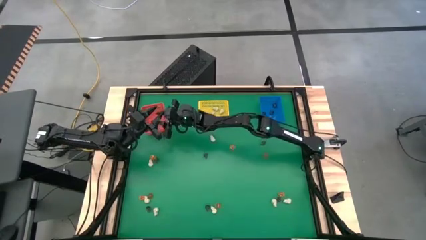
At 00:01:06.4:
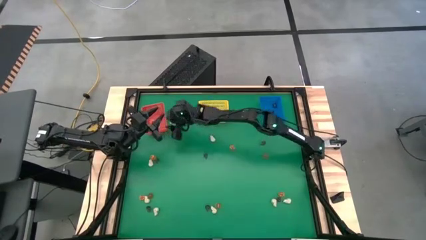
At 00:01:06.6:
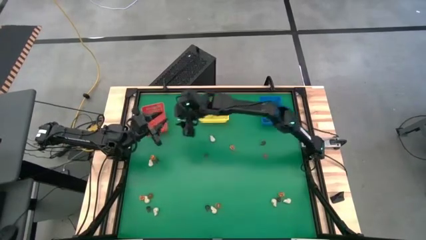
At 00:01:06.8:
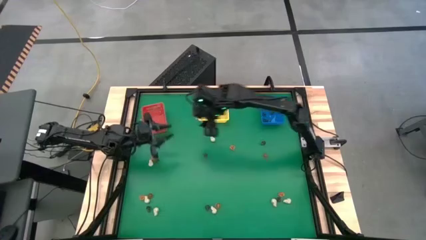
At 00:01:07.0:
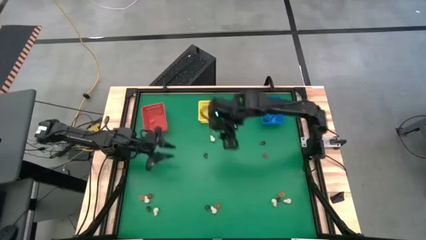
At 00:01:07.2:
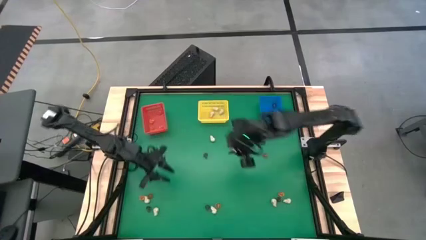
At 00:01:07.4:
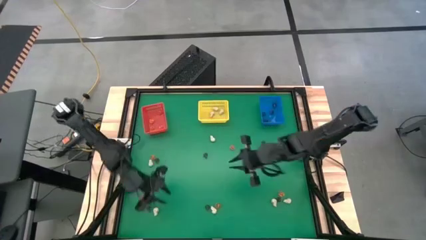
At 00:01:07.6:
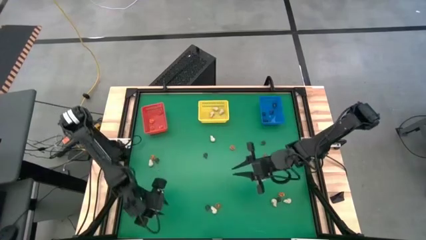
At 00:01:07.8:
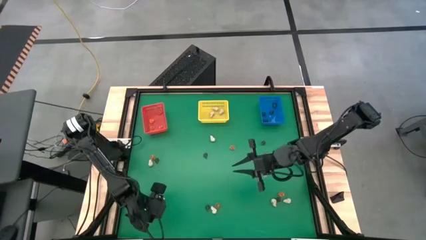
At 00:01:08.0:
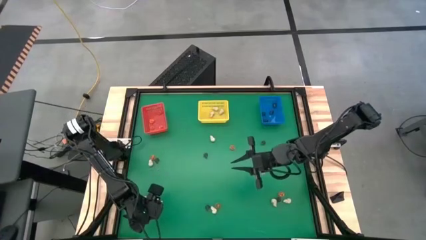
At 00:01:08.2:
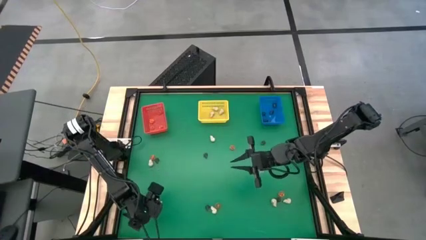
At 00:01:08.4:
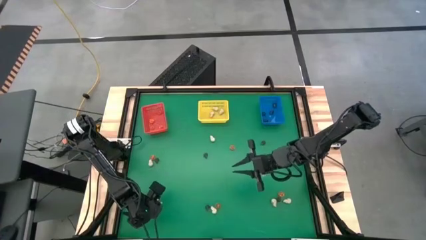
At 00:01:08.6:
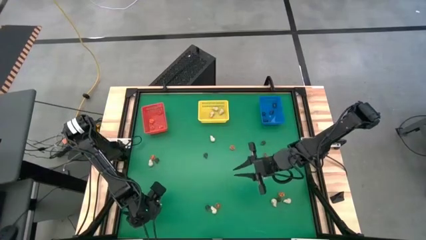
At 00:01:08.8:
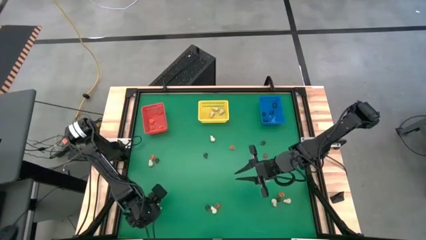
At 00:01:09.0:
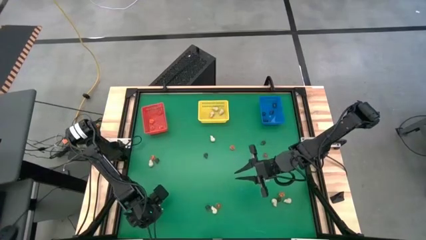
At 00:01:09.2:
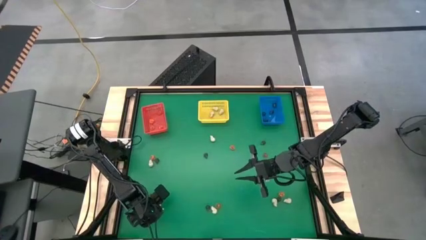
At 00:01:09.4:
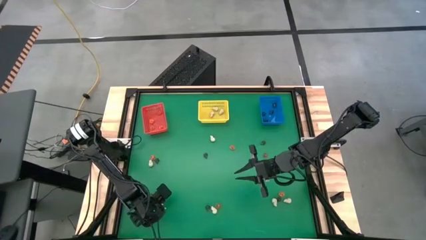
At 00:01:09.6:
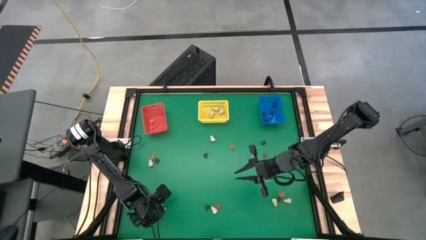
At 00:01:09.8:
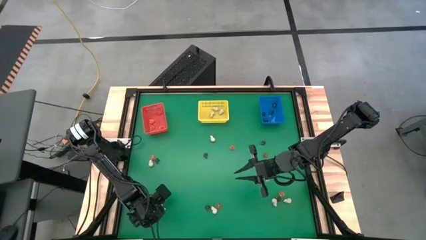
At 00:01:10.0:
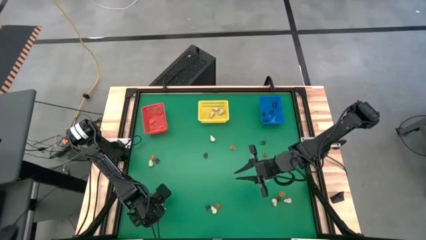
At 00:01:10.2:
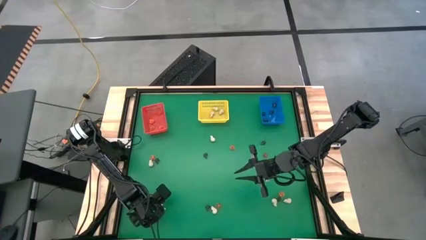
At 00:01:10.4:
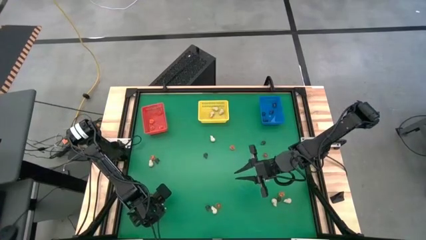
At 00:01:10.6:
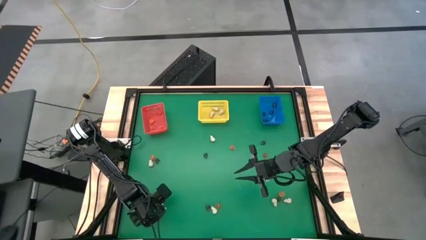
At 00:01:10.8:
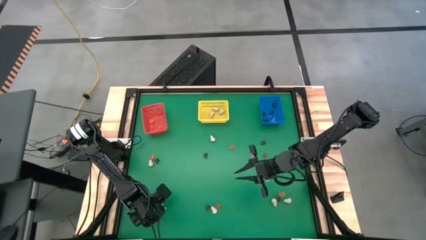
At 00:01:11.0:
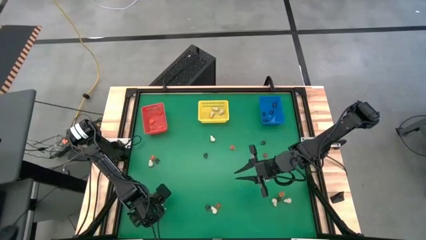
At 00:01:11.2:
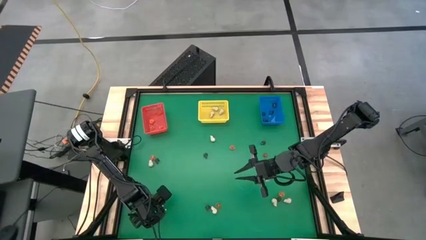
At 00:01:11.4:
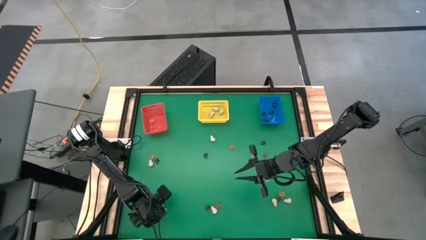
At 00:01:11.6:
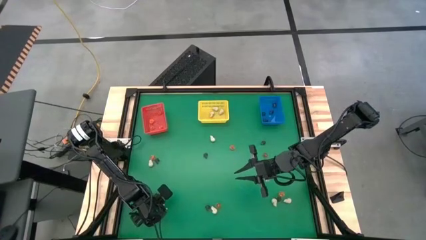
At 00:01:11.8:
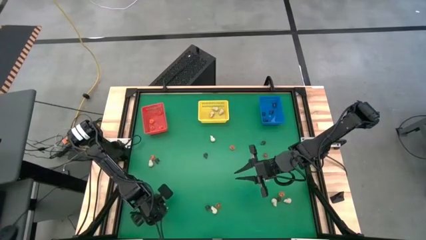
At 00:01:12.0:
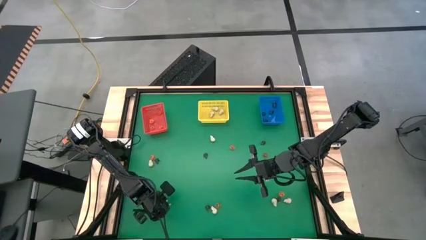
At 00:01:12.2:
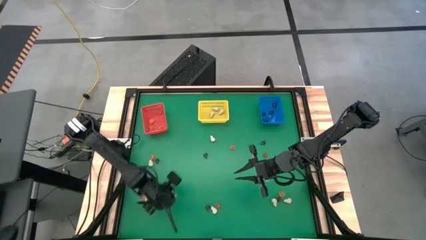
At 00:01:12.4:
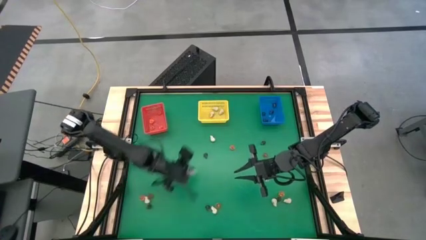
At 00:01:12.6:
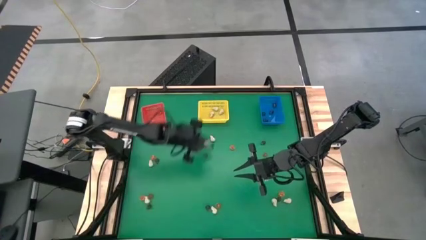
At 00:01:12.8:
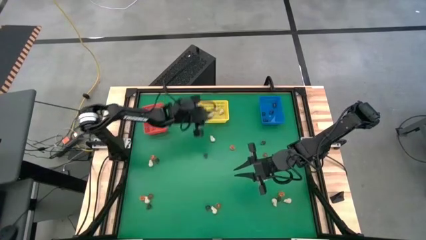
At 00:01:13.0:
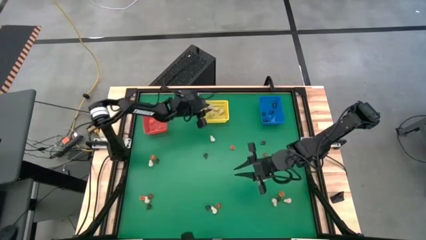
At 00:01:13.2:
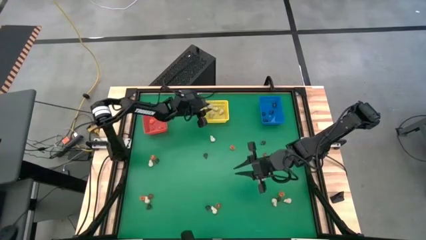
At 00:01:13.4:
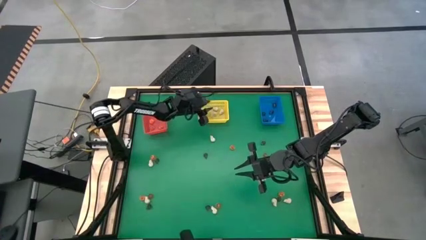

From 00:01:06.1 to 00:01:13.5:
Task: Sort Halloween decoration
Put the white skull toy into the yellow bin

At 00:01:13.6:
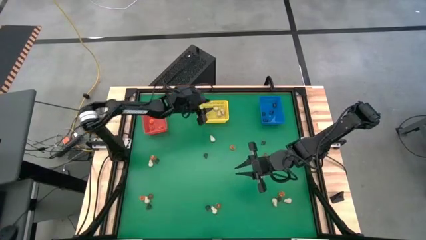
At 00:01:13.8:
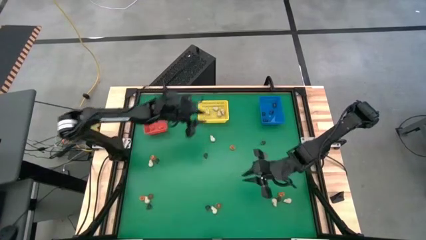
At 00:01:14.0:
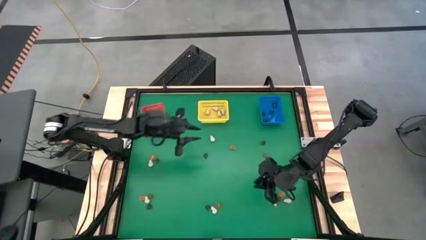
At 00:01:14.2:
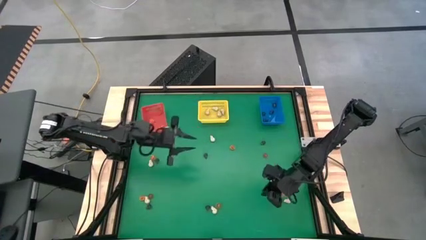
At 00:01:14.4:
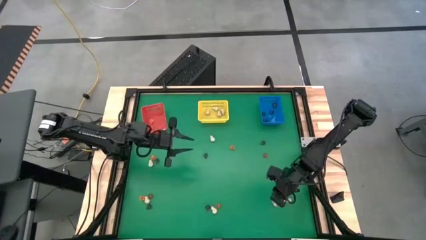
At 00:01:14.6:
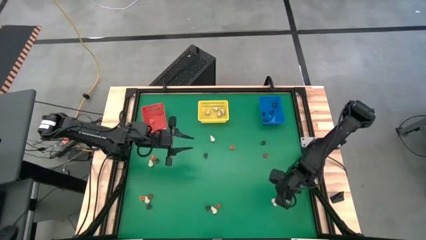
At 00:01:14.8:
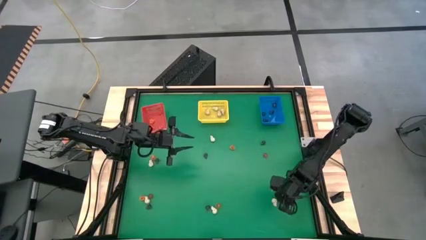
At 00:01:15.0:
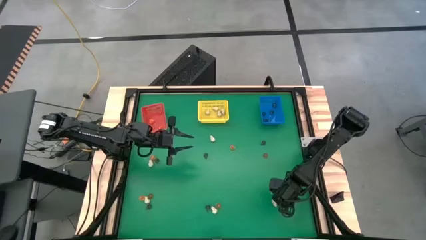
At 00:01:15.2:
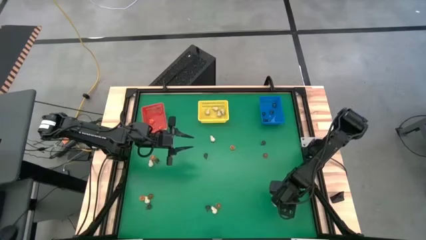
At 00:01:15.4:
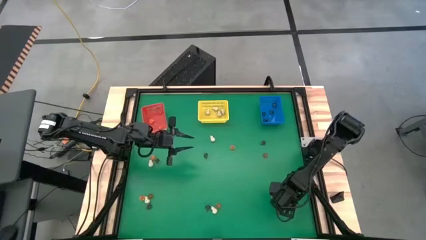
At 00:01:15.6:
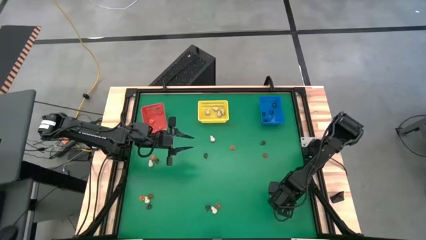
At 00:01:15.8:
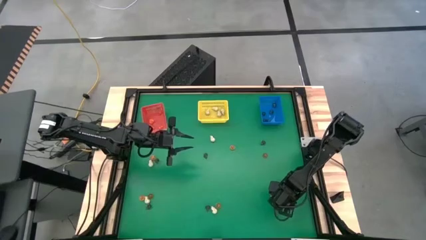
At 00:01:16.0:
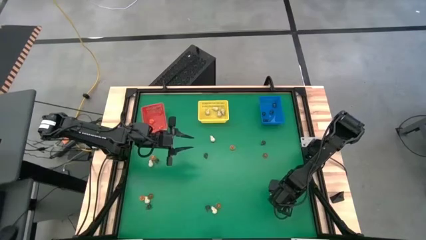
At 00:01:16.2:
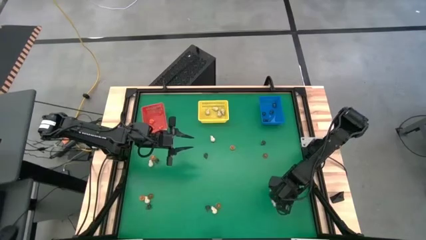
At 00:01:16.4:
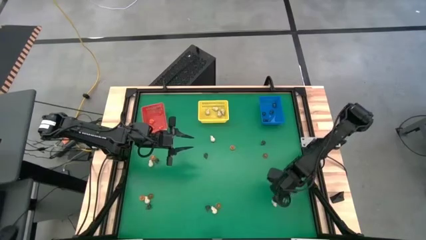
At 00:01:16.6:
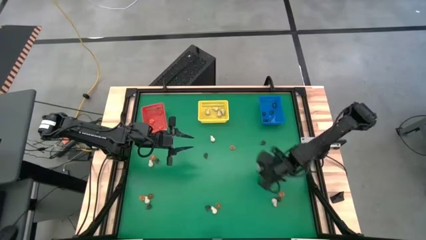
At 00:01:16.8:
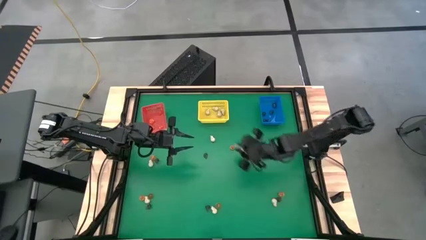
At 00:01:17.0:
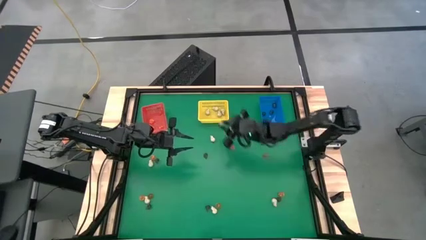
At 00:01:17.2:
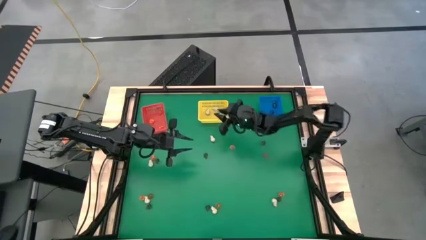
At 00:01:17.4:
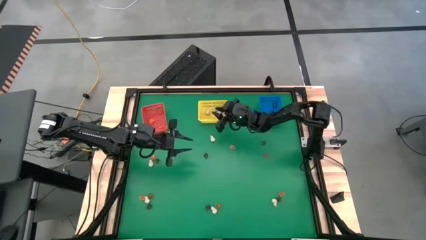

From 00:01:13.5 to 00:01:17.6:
Put the white skull toy into the yellow bin

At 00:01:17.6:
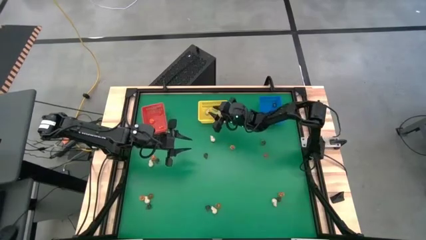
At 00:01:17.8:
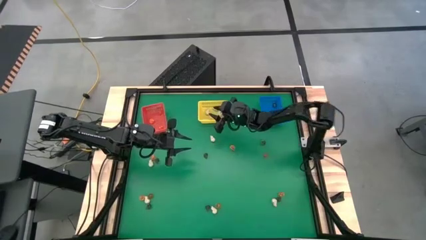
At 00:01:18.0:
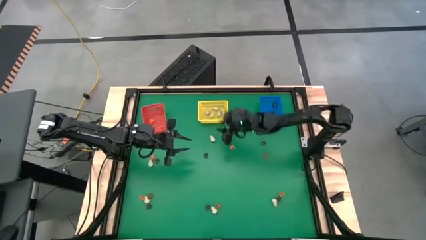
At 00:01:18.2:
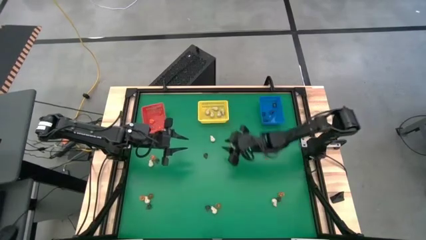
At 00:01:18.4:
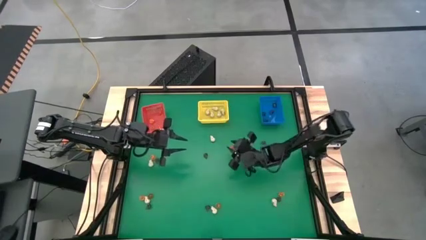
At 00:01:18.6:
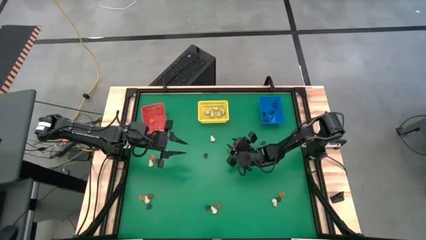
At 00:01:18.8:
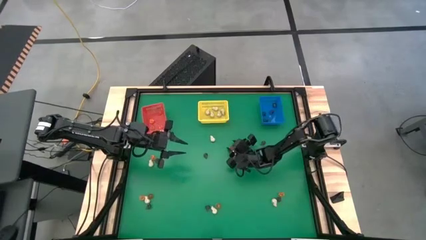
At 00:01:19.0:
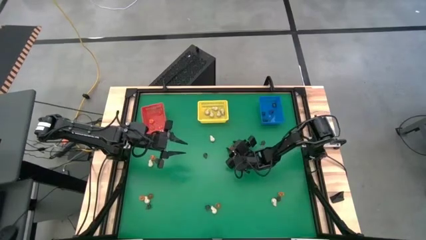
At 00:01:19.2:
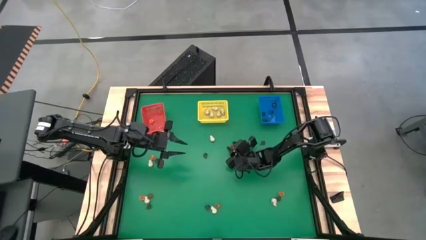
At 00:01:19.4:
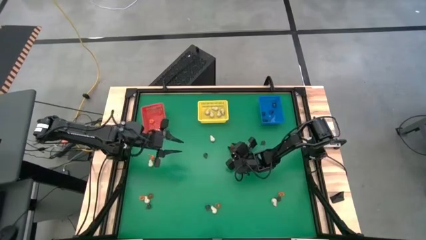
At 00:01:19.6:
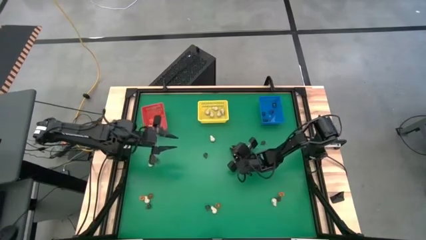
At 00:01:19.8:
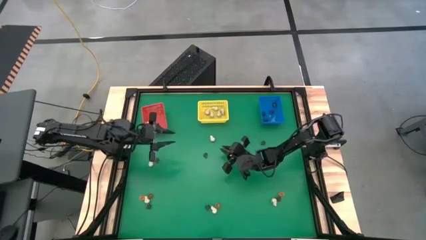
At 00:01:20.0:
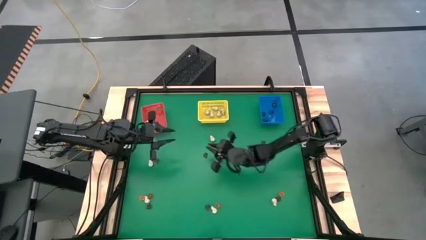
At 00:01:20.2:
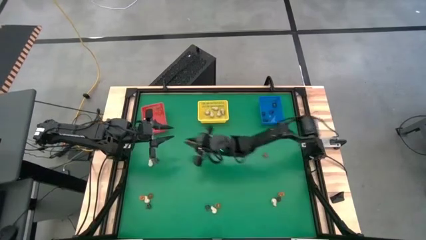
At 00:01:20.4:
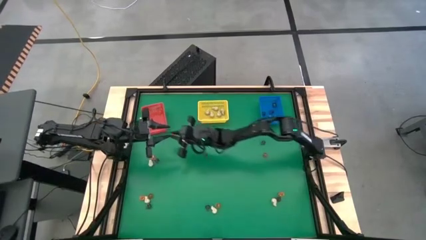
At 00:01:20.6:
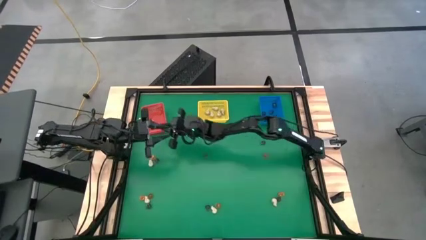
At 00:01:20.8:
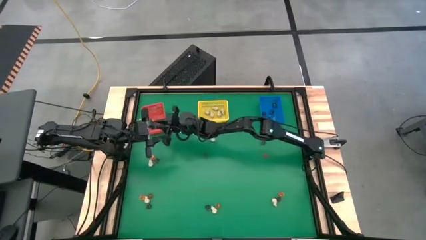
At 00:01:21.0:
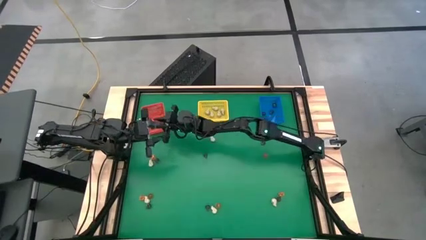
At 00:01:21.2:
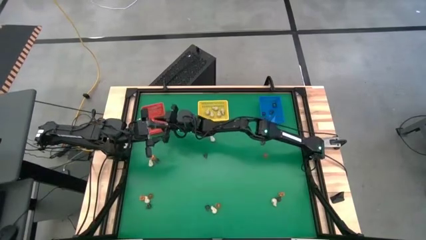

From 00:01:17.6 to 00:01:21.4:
Put the orange flower toy into the red bin

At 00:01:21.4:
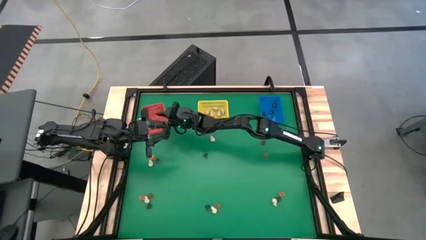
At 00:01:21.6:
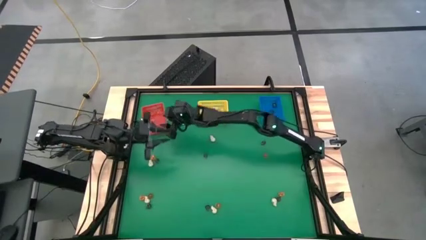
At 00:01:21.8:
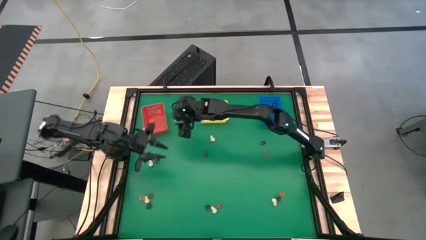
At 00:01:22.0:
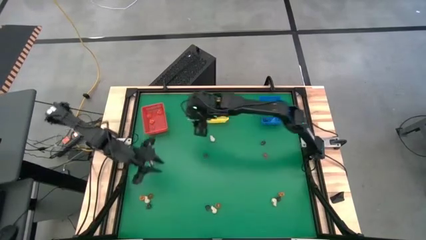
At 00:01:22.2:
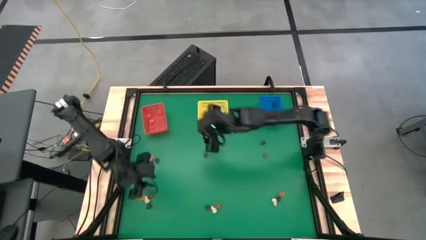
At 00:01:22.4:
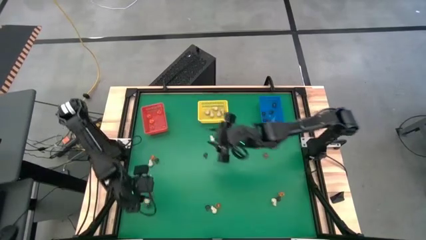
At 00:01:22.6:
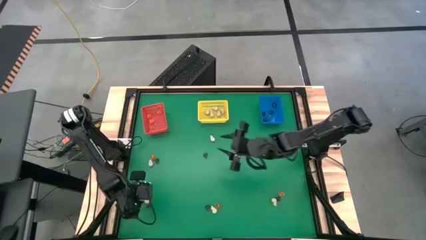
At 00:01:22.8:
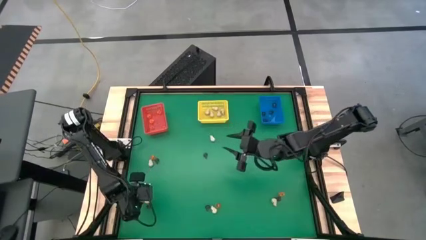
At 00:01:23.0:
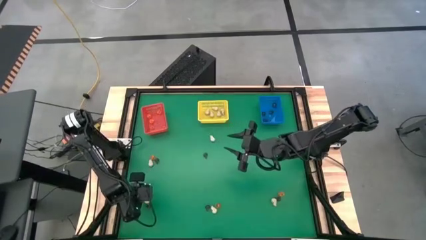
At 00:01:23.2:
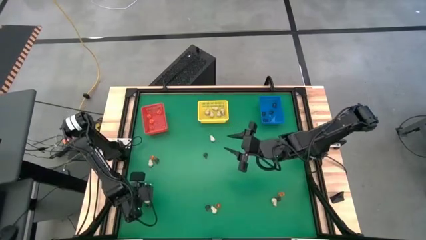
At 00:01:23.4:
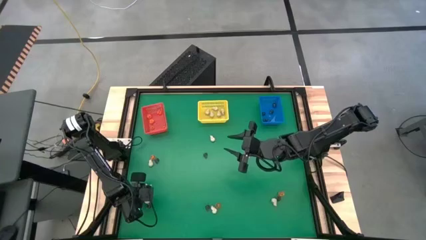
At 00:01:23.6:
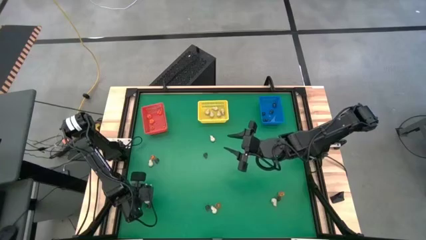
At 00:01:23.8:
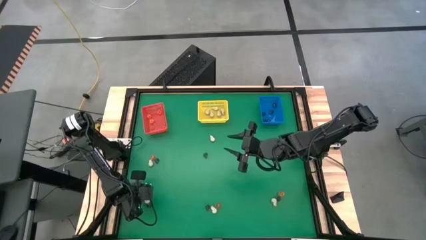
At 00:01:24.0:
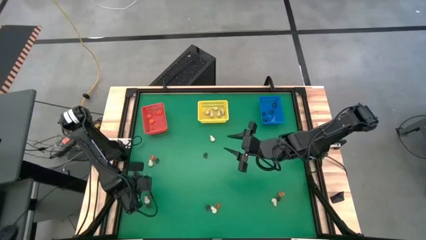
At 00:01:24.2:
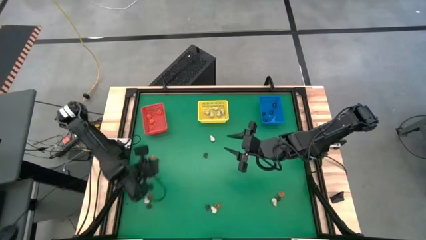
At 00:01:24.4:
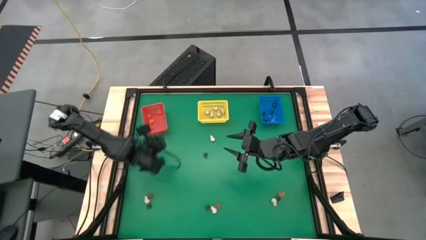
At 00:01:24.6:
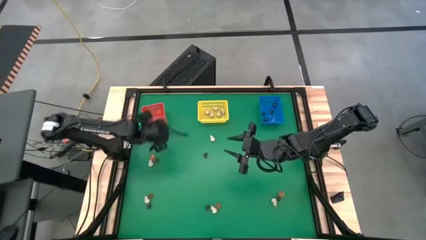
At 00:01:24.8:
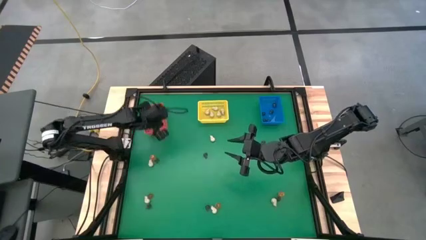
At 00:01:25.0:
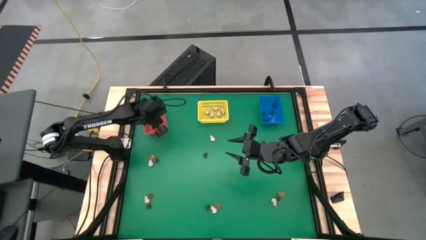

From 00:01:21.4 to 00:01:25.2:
Put the orange flower toy into the red bin
